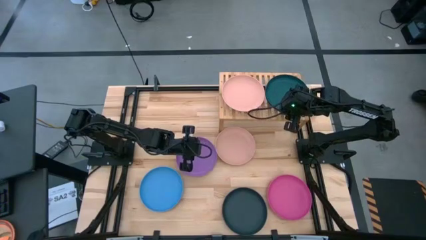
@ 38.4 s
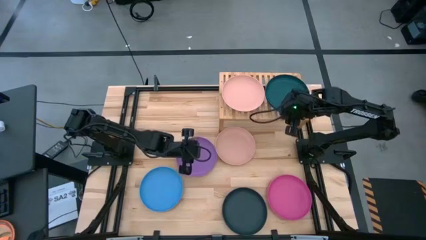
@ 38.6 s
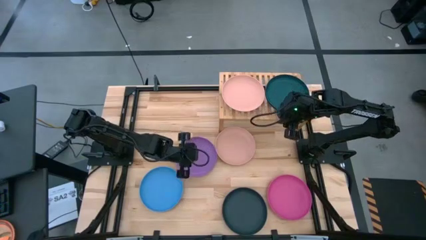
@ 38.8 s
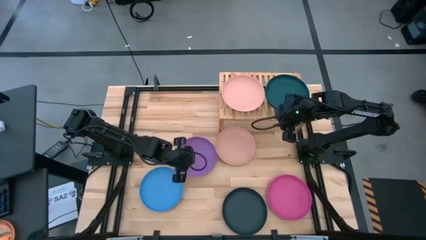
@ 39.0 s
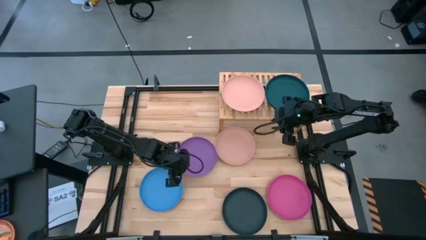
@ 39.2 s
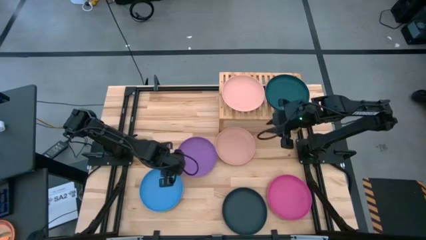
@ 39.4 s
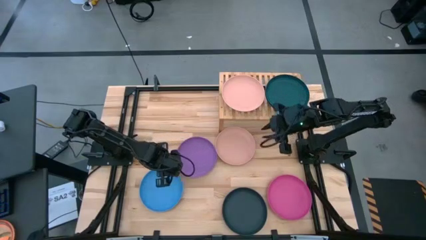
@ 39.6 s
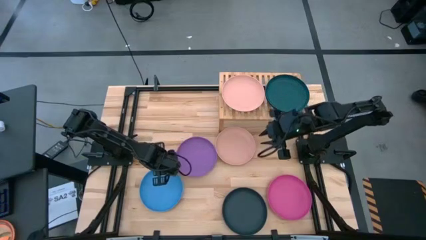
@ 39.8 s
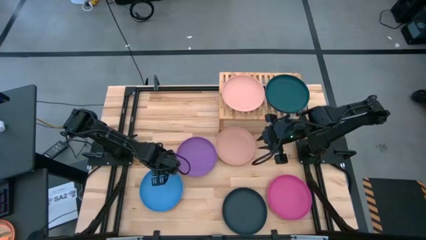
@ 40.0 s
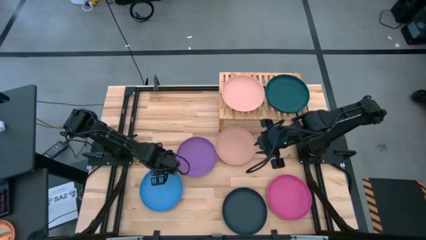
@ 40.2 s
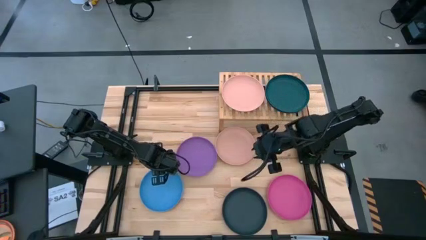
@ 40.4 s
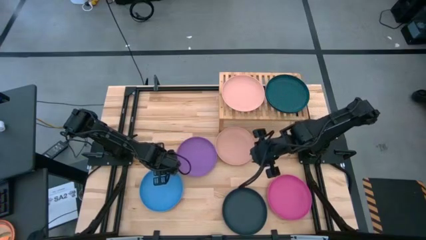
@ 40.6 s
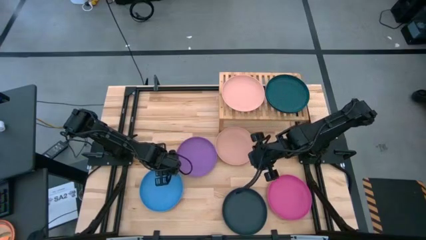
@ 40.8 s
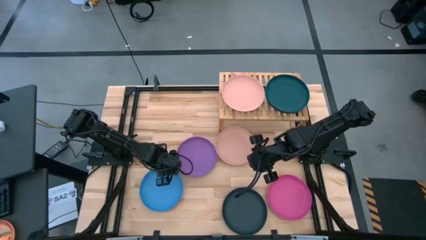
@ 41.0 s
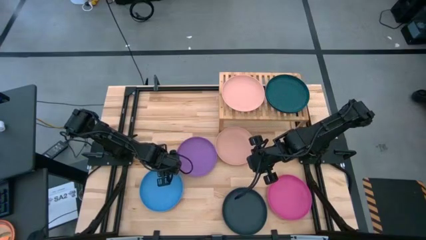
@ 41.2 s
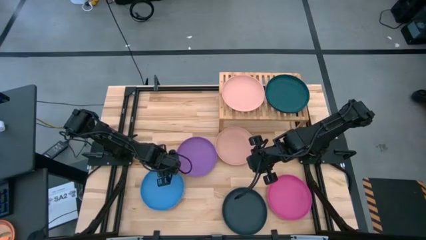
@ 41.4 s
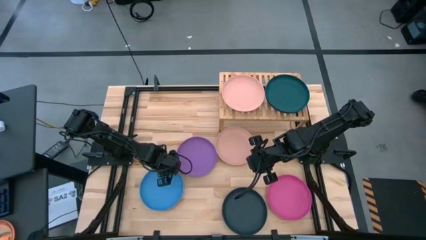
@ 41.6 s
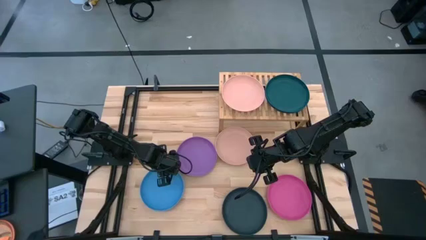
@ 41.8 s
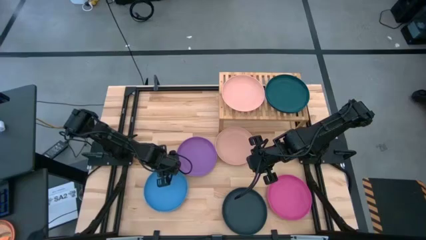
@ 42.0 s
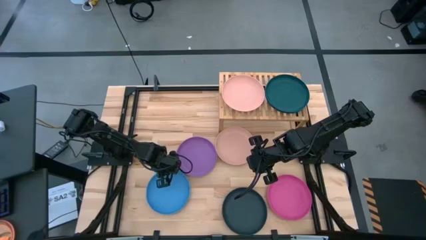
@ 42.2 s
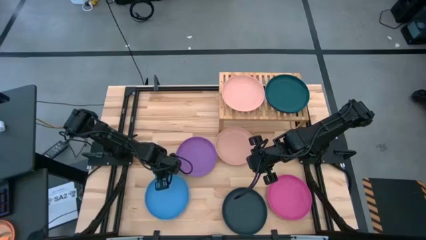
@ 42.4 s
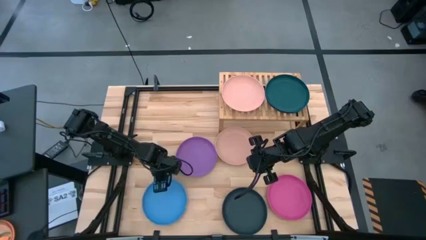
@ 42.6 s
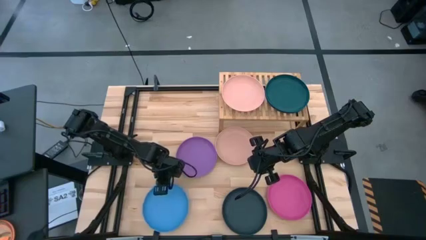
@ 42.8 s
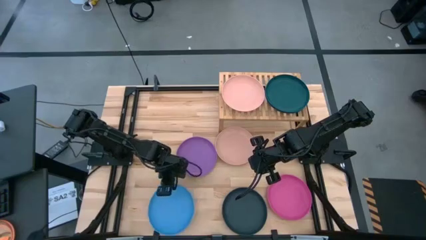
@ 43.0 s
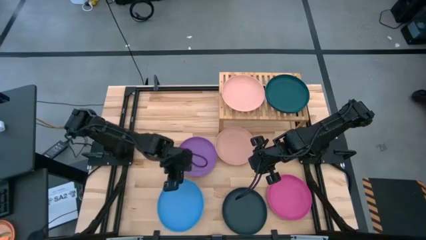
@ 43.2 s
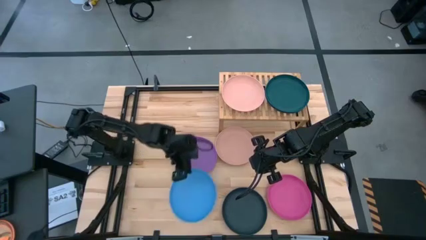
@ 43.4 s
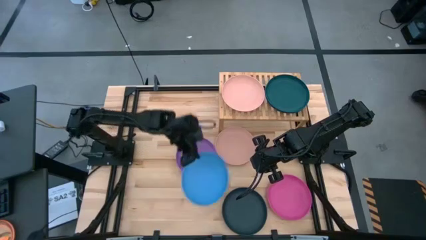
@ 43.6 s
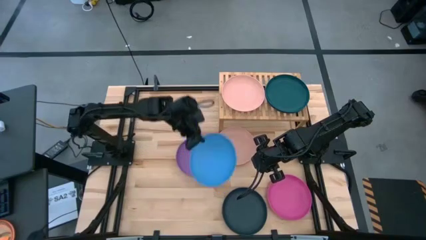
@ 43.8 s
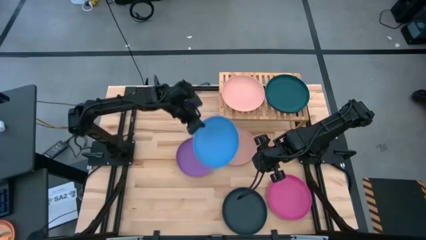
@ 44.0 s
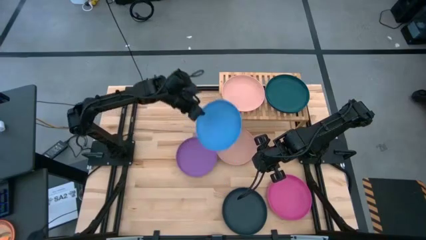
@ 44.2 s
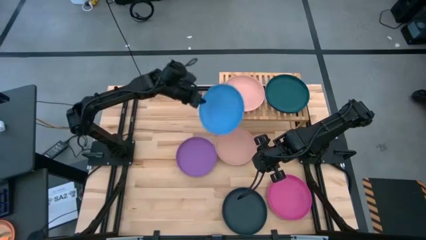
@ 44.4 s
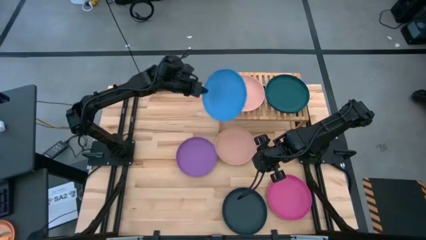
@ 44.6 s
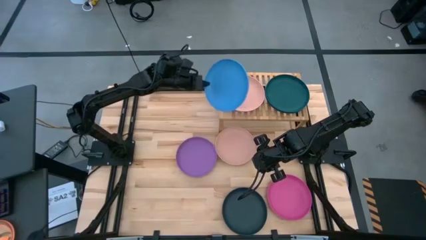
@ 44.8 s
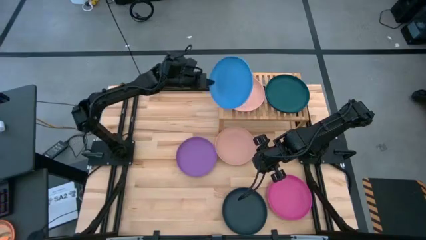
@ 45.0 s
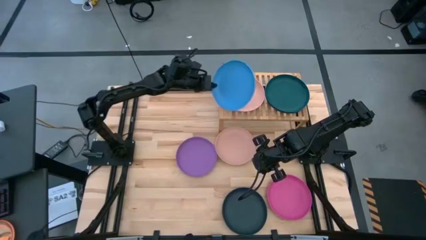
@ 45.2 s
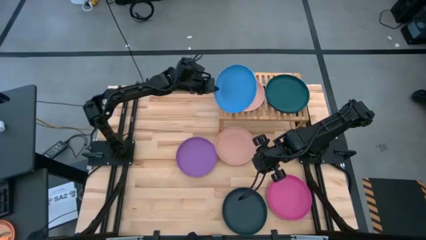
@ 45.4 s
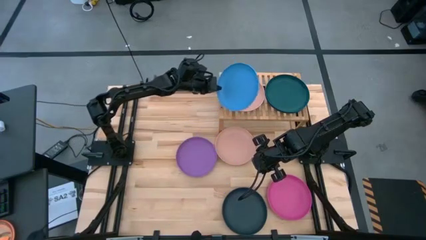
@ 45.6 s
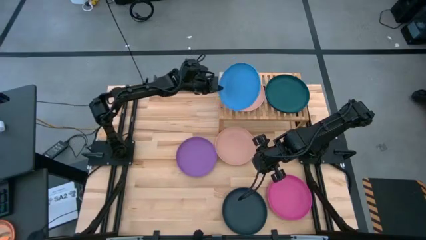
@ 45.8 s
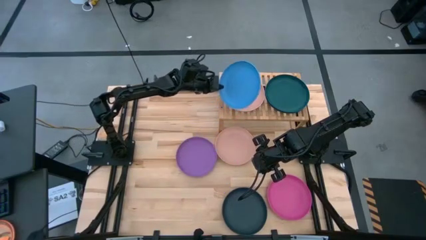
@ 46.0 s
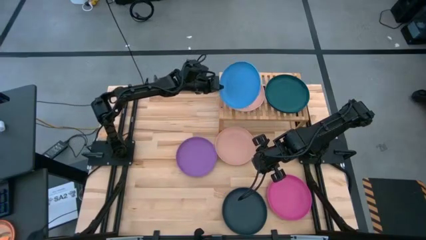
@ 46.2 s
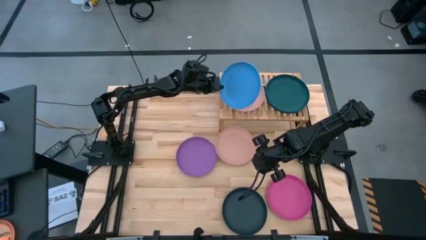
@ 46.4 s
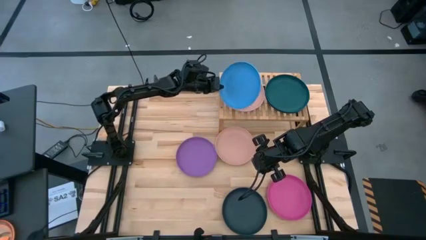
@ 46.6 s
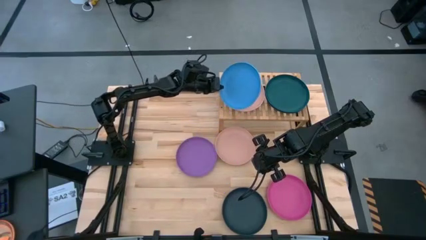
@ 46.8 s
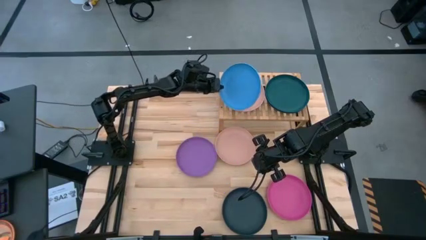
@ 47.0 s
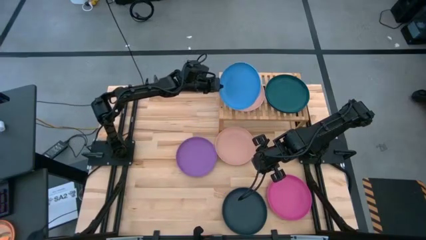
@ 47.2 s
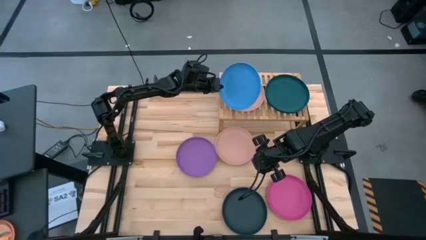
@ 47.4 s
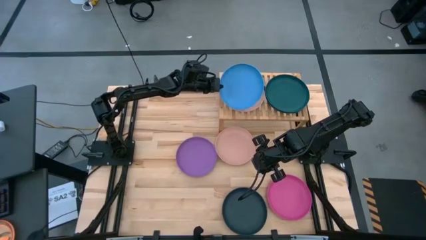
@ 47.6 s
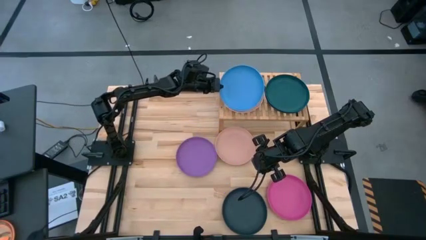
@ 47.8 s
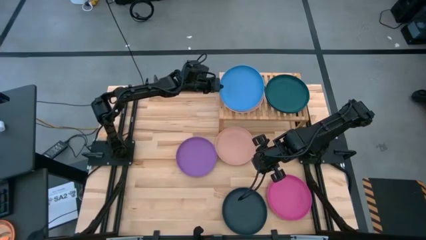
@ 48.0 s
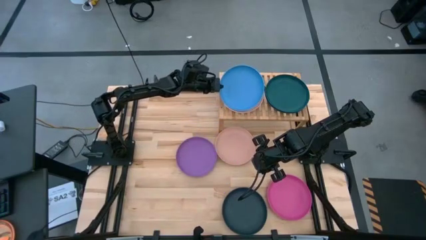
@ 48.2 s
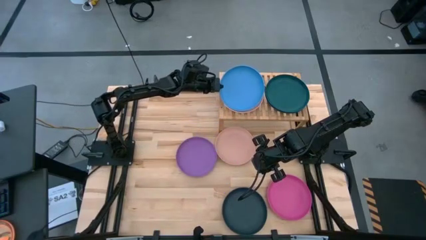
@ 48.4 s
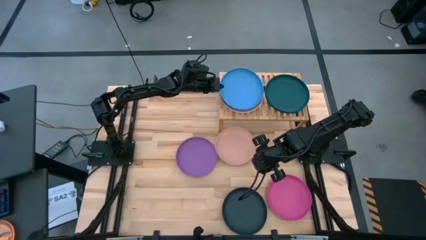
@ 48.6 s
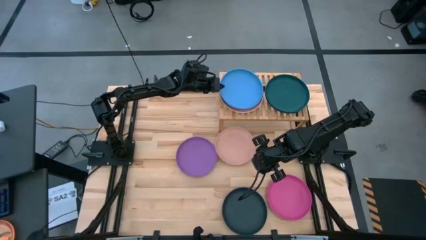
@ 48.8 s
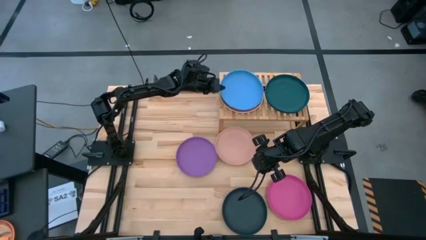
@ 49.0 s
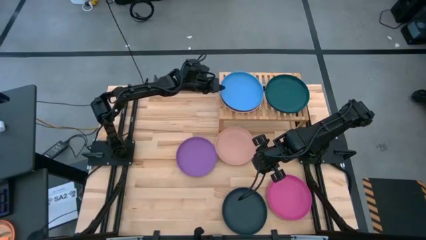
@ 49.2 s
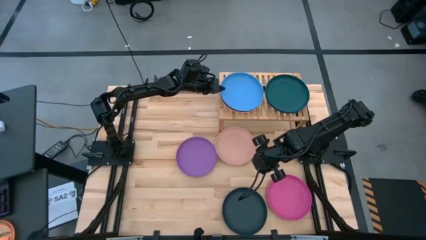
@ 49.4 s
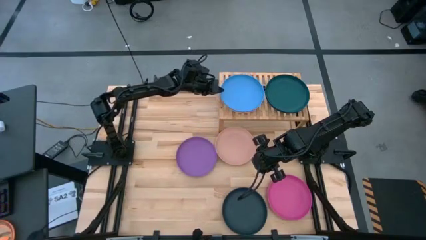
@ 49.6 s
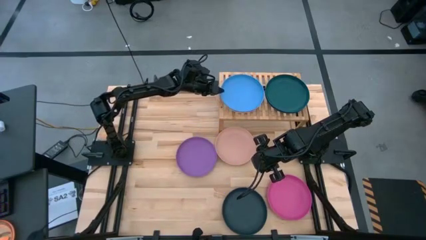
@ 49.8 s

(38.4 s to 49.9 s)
Task: Place and stack plates onto a shelf
Stack the blue plate on top of the light orange plate on the shelf
